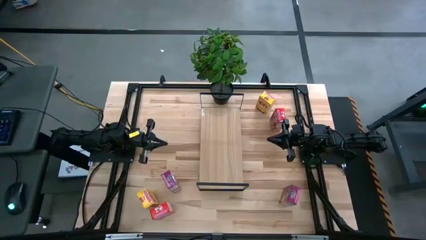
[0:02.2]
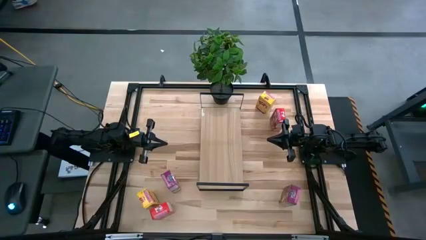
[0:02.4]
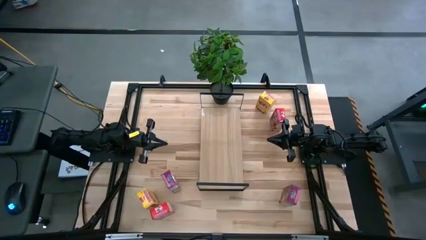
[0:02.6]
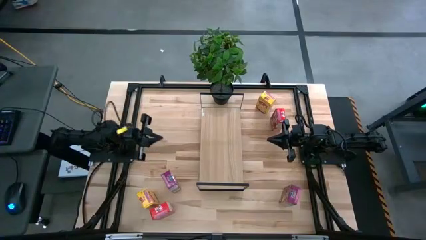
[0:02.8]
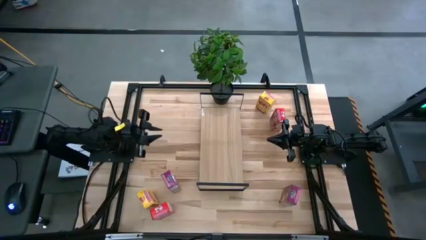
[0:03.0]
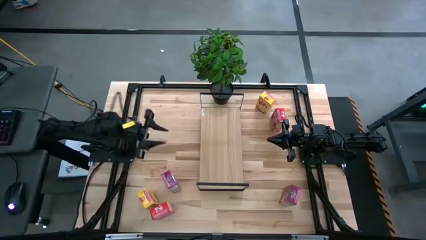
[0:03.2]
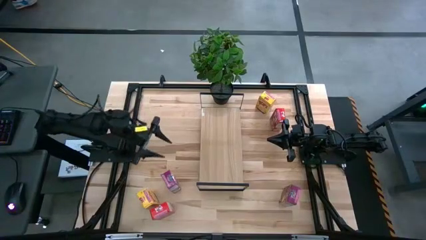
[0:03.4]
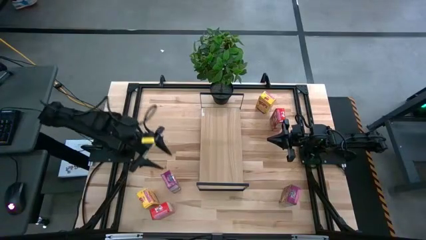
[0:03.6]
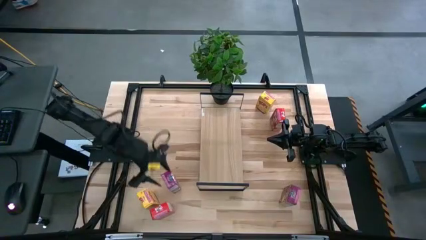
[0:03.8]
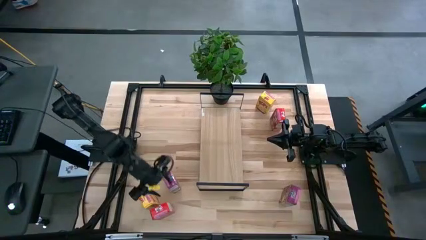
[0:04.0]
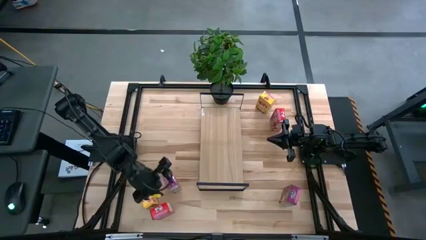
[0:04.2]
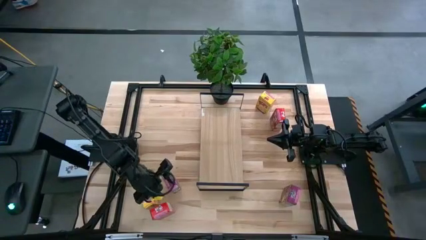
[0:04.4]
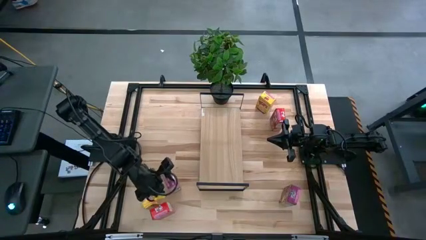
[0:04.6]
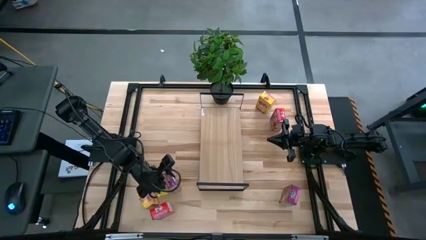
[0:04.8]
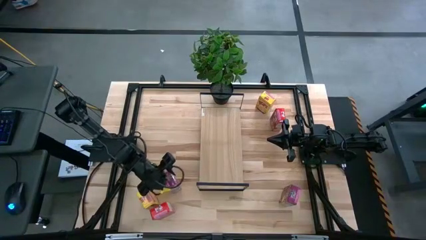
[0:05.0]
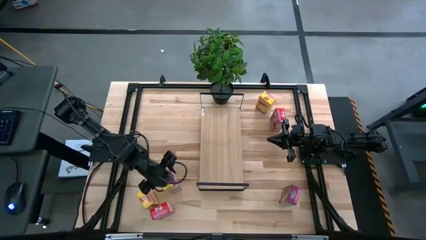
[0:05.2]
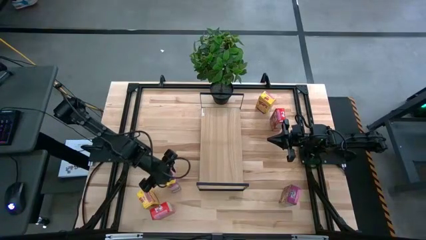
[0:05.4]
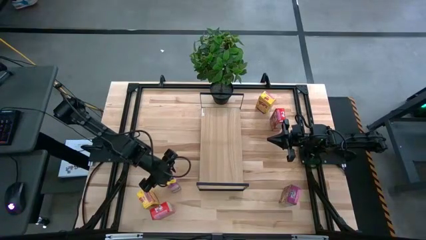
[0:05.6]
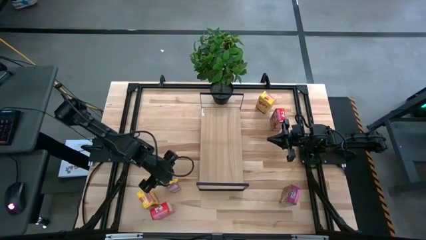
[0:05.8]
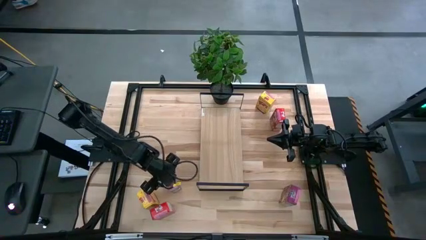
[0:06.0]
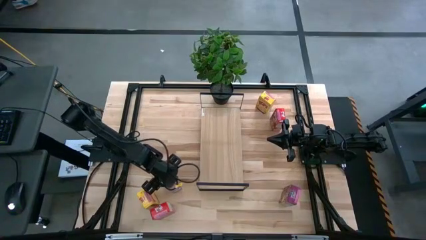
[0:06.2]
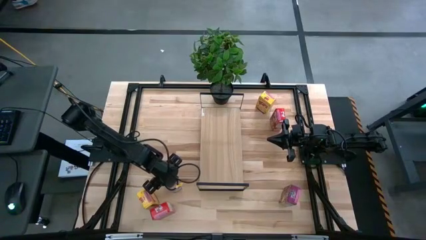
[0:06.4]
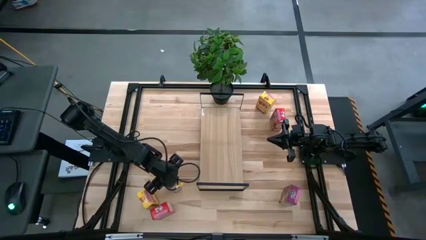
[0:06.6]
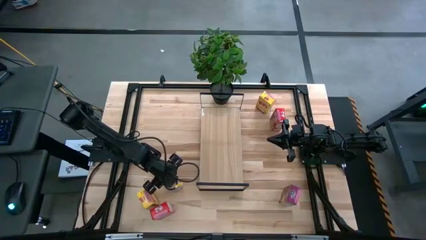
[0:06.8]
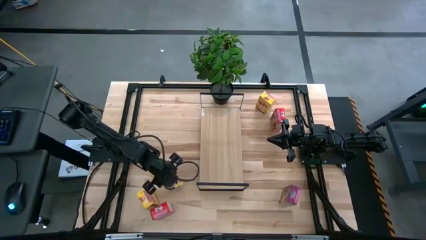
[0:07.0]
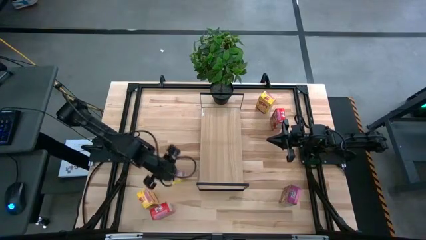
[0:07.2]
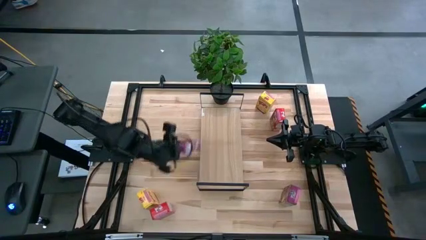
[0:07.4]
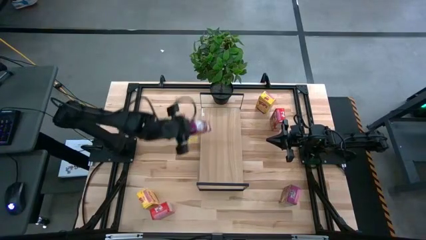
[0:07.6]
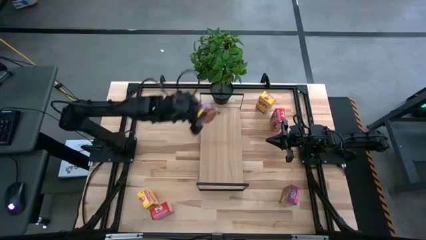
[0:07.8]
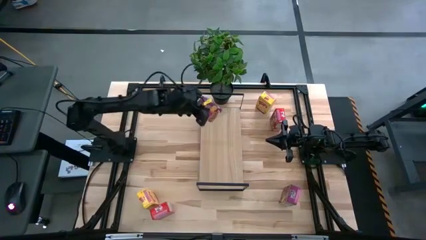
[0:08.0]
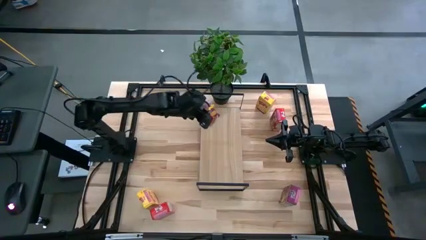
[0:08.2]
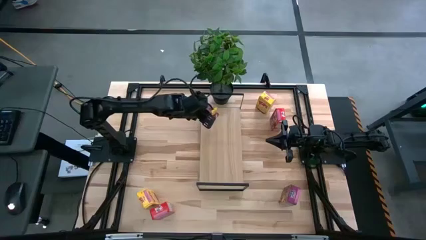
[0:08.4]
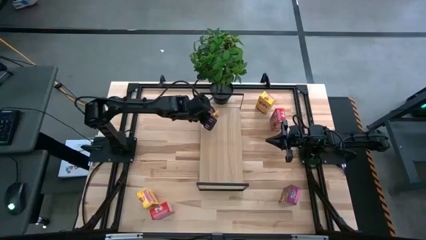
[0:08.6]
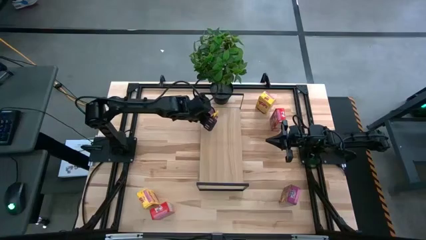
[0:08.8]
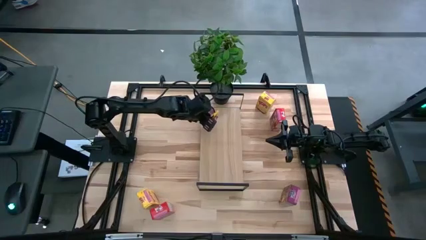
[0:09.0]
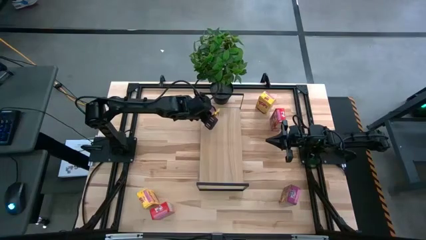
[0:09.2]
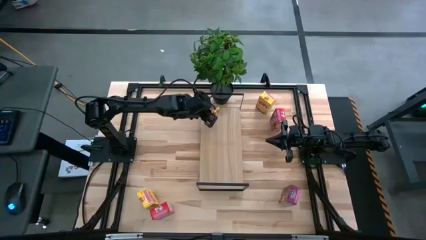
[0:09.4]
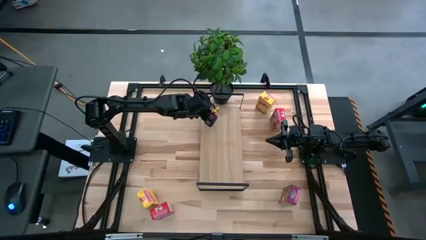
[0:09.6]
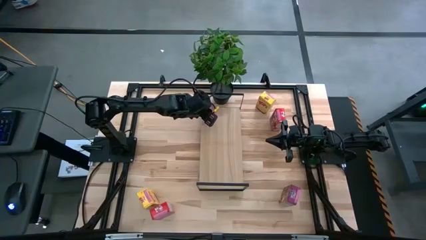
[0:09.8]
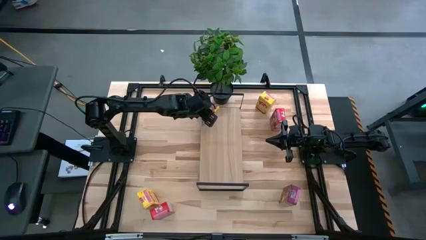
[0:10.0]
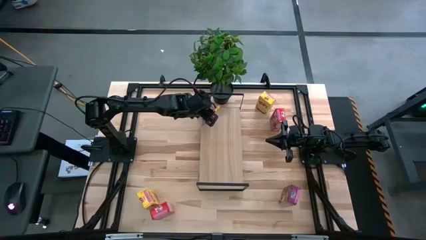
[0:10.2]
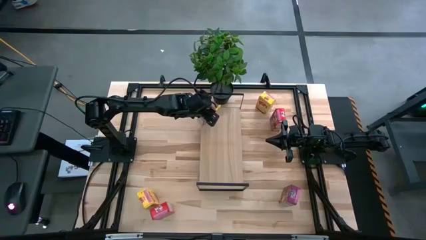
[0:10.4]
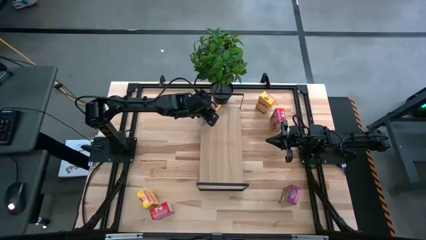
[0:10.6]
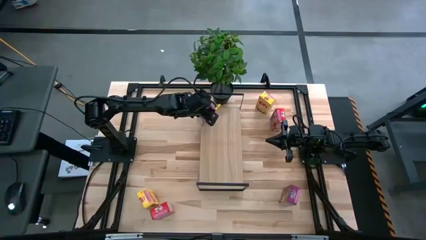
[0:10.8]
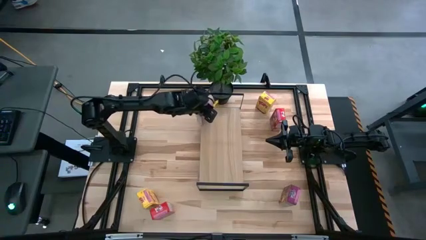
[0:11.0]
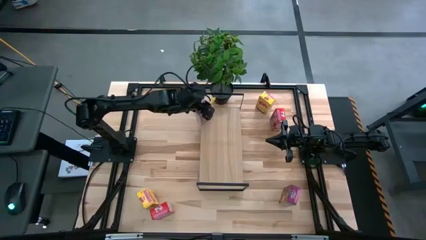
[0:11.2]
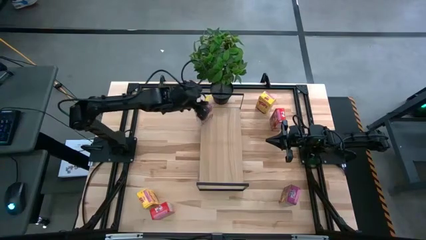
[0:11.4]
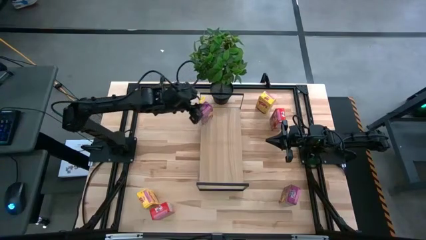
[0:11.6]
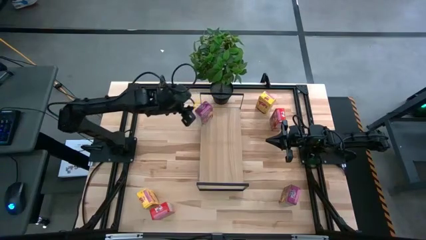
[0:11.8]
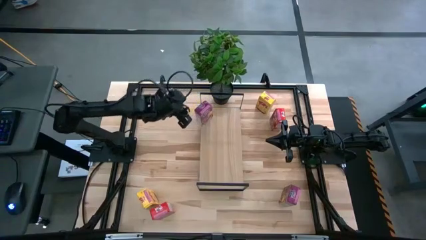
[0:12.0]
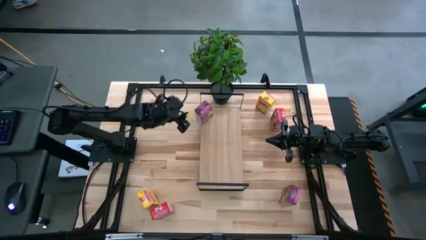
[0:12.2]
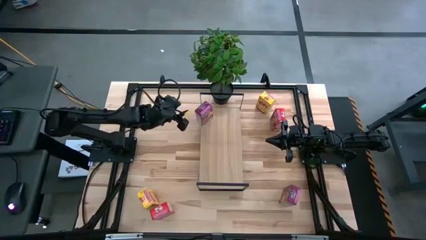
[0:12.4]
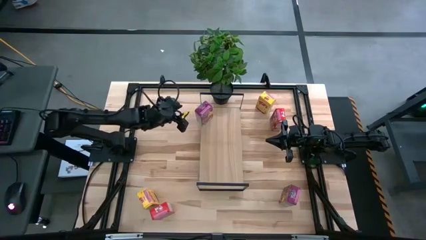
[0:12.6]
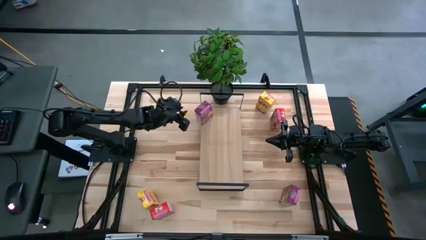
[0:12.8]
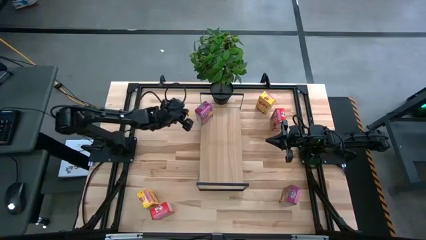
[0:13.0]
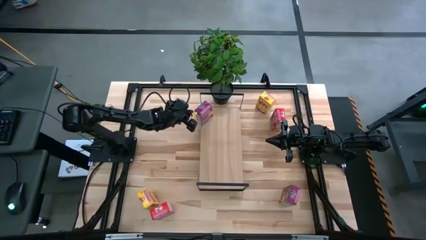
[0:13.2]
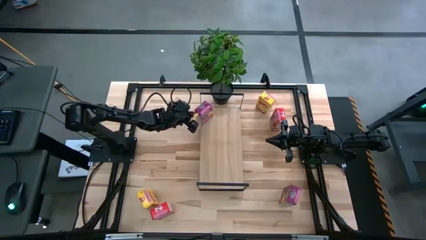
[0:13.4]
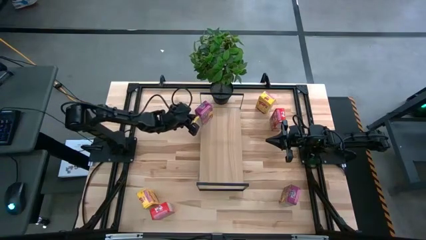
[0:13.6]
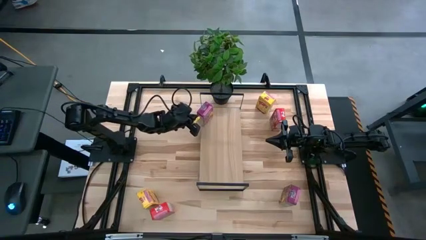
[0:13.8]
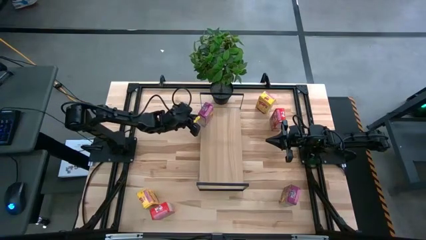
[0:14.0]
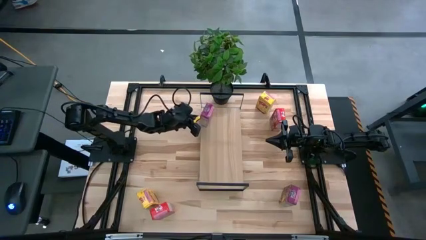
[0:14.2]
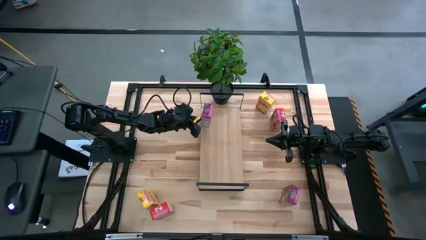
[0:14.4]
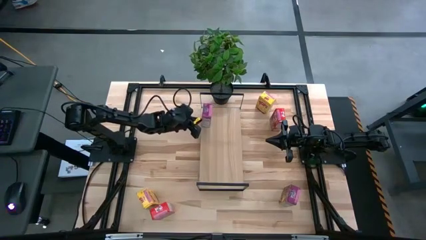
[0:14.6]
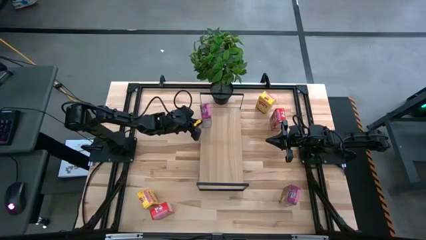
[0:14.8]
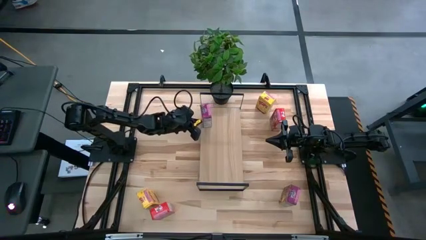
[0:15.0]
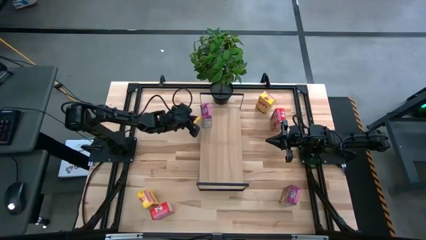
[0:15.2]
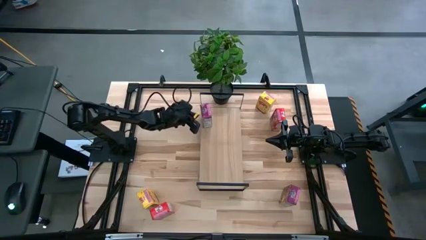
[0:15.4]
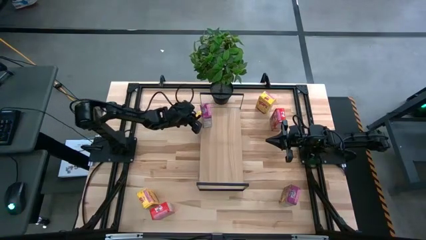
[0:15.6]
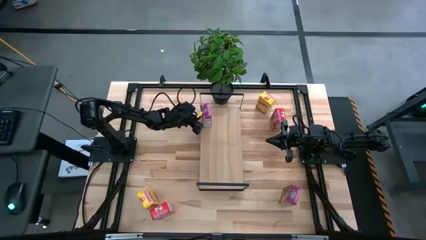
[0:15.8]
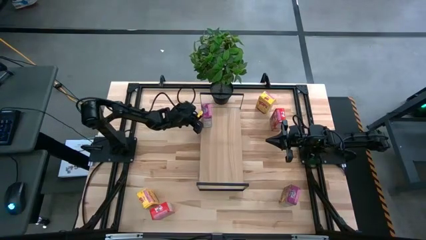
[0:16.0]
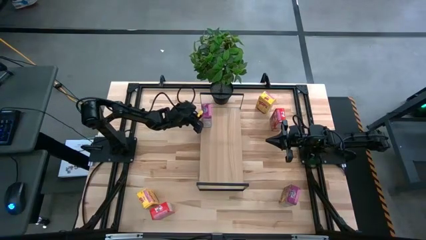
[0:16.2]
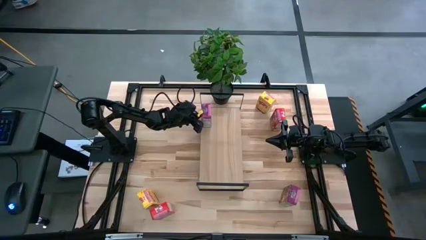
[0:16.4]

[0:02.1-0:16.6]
Task: Stack cereal on shelf
Put the left purple cereal box on the shelf

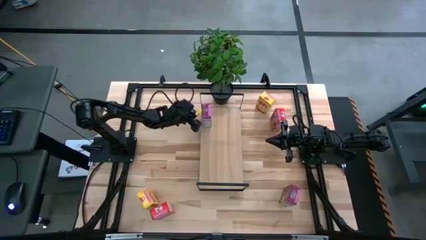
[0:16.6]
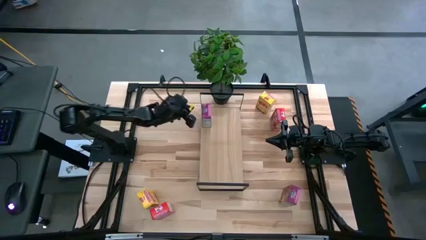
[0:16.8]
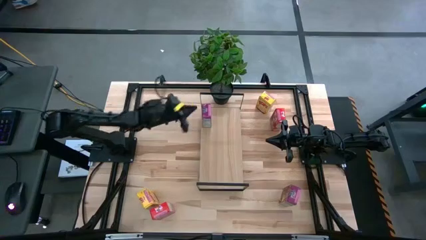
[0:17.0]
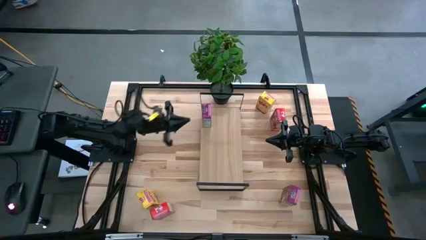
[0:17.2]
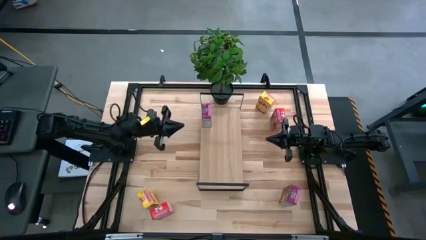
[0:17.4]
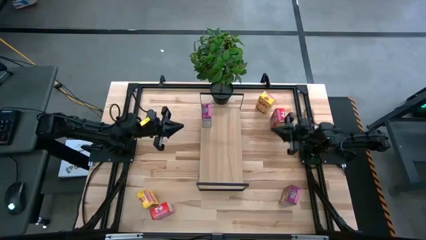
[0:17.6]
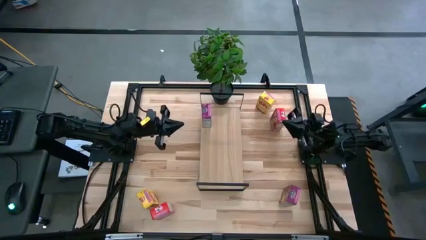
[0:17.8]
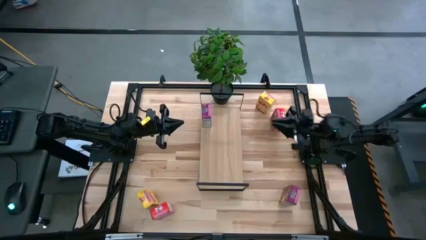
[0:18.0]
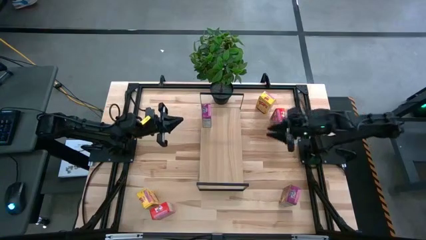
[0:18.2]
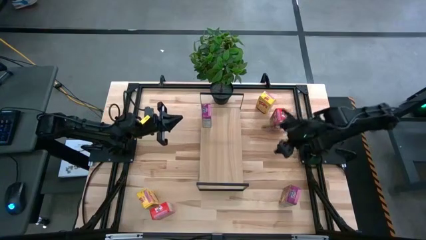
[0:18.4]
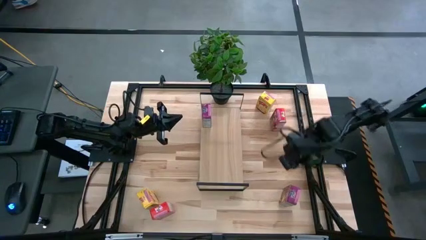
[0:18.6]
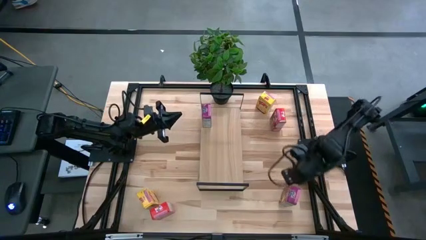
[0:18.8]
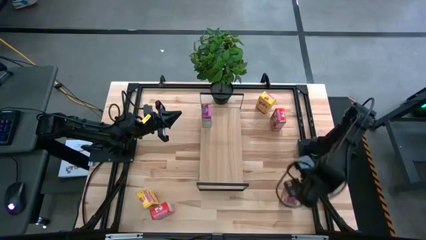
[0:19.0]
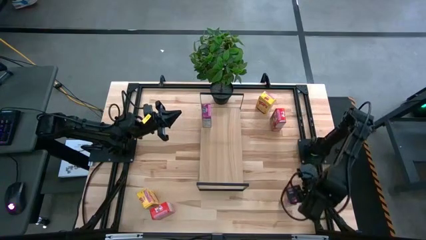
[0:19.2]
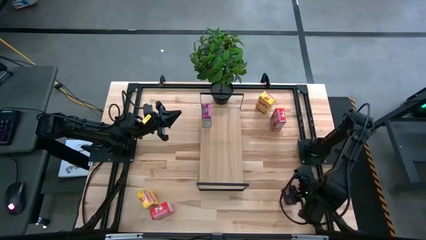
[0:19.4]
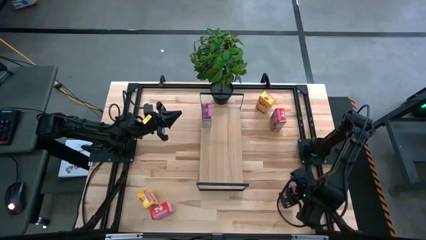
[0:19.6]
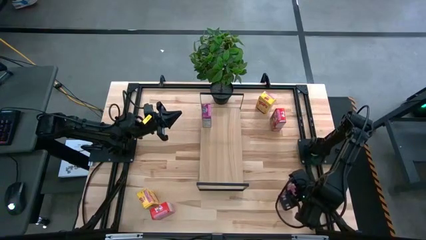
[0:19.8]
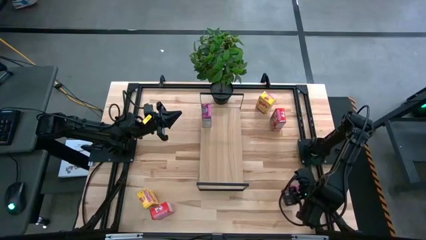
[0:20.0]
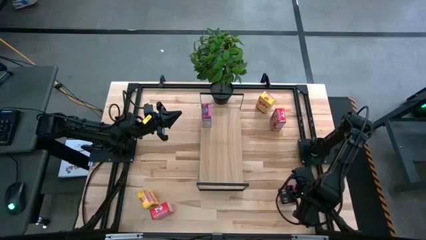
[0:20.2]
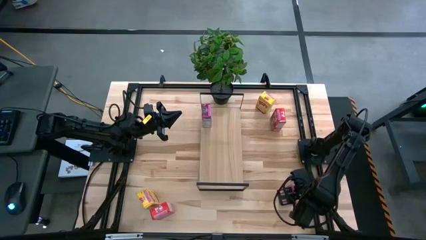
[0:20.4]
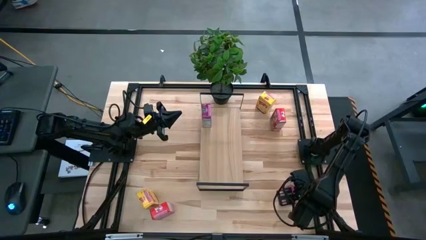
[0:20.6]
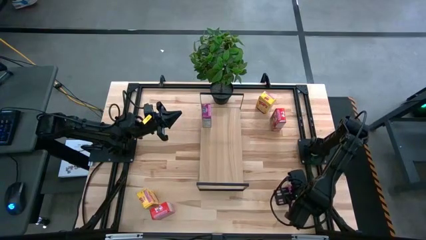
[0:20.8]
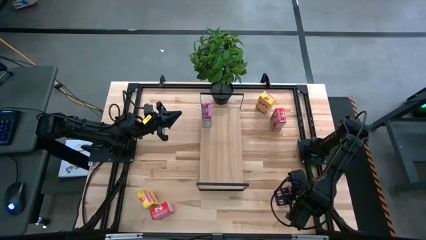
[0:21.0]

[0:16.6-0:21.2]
Put the purple cereal box on the shelf aligned with the other purple cereal box
